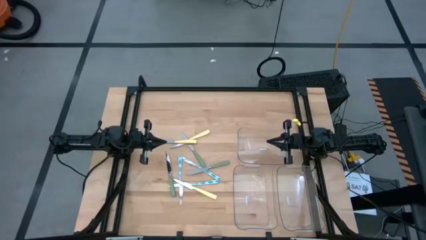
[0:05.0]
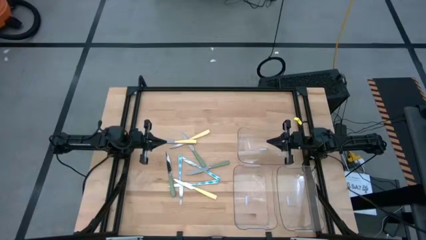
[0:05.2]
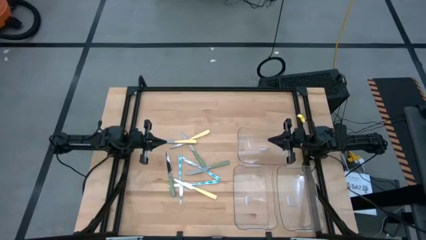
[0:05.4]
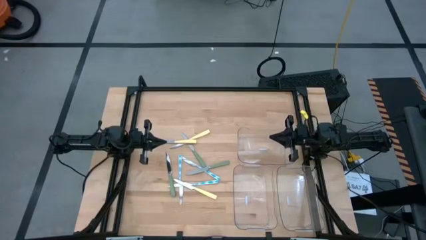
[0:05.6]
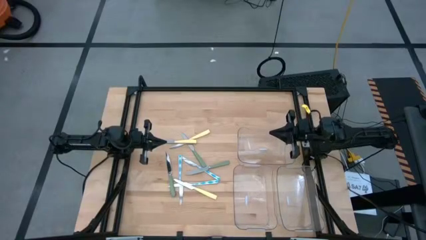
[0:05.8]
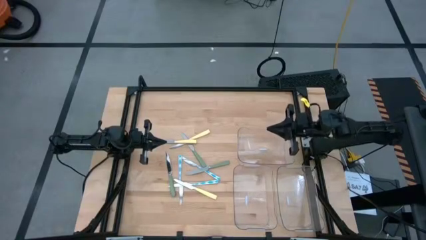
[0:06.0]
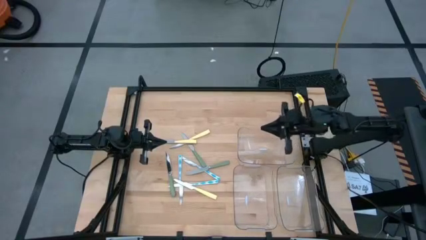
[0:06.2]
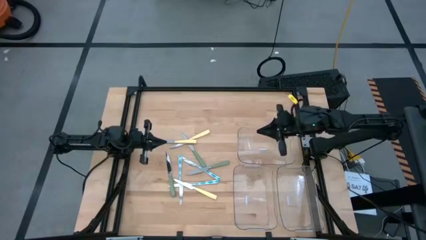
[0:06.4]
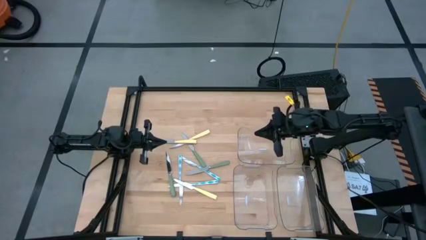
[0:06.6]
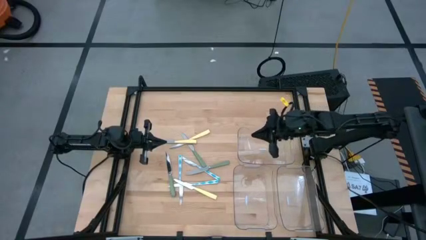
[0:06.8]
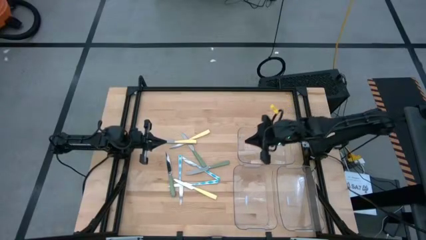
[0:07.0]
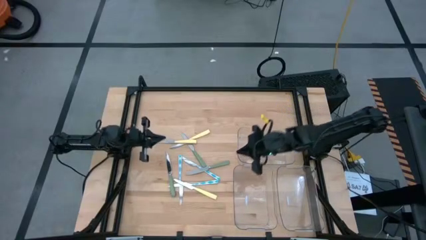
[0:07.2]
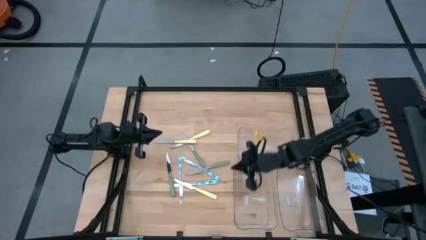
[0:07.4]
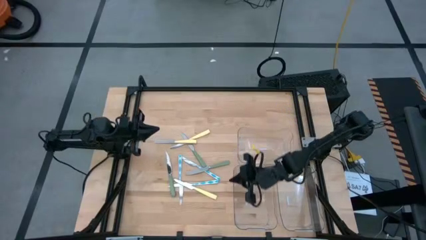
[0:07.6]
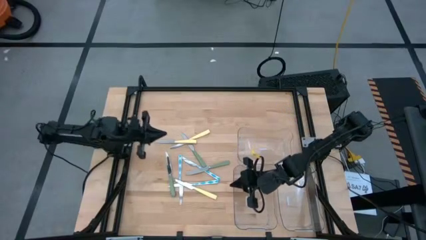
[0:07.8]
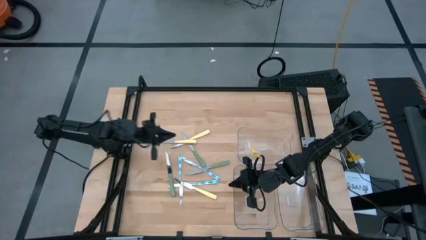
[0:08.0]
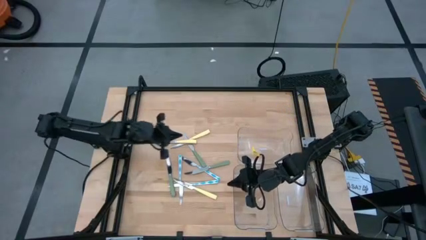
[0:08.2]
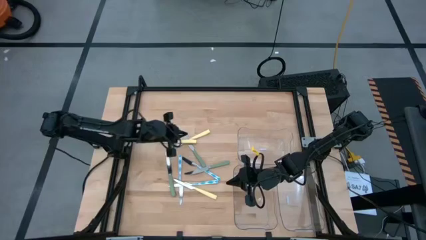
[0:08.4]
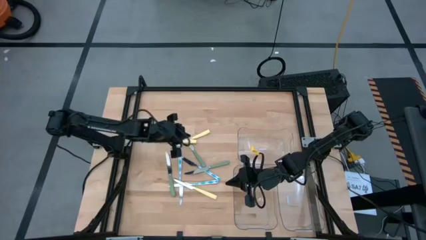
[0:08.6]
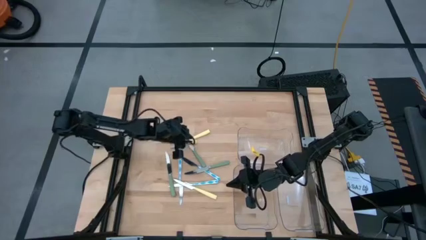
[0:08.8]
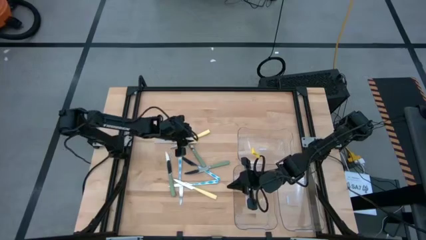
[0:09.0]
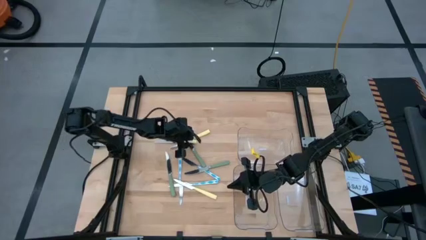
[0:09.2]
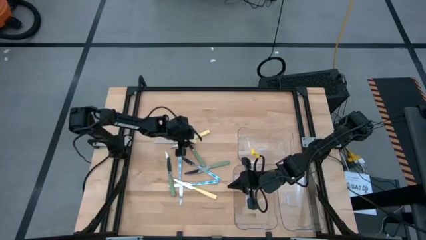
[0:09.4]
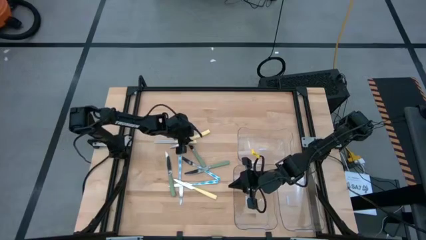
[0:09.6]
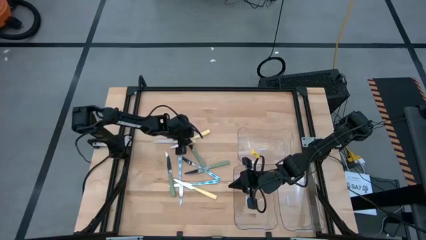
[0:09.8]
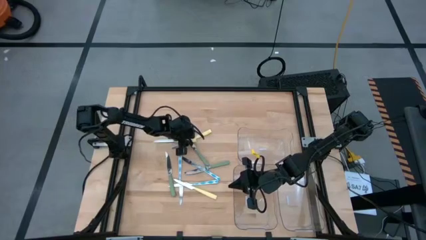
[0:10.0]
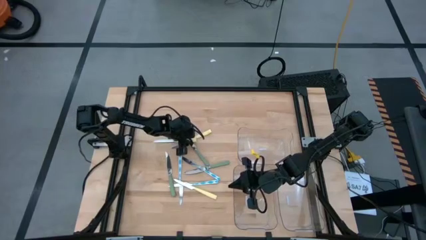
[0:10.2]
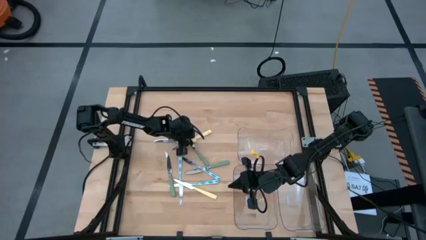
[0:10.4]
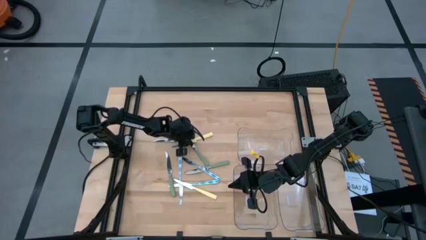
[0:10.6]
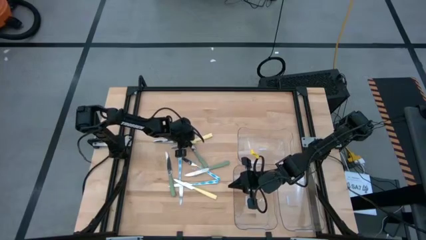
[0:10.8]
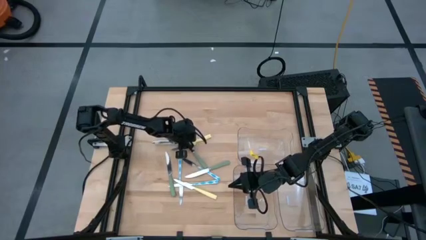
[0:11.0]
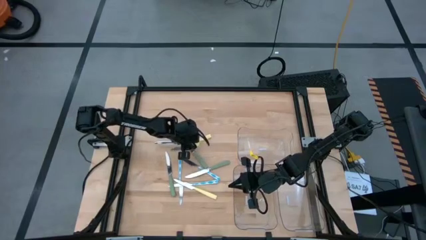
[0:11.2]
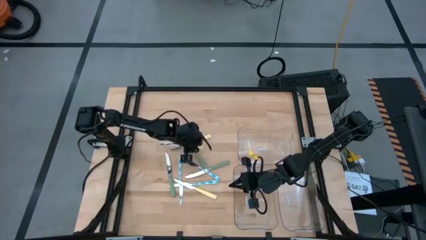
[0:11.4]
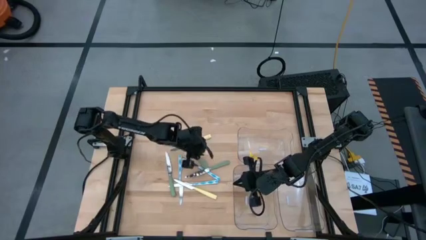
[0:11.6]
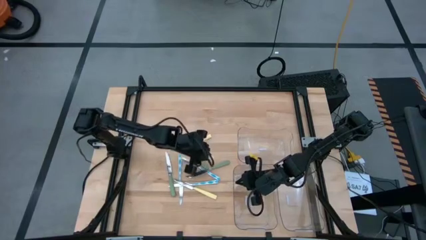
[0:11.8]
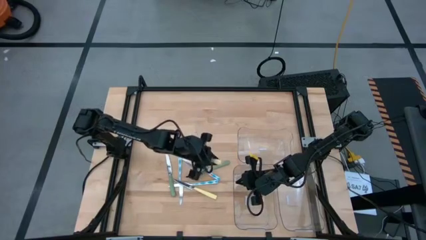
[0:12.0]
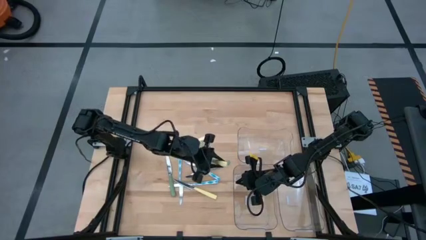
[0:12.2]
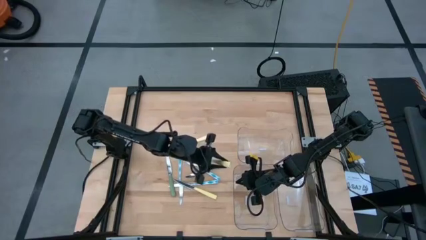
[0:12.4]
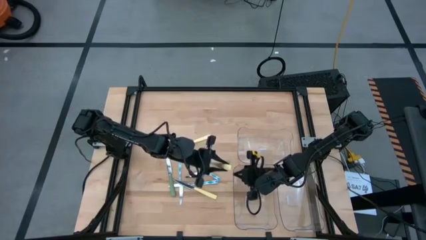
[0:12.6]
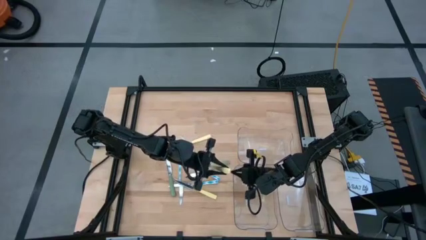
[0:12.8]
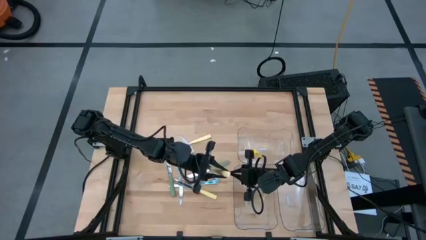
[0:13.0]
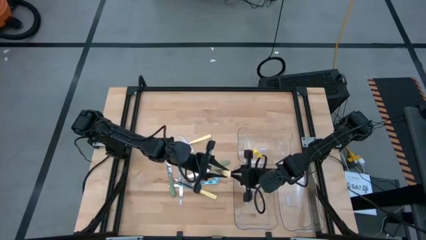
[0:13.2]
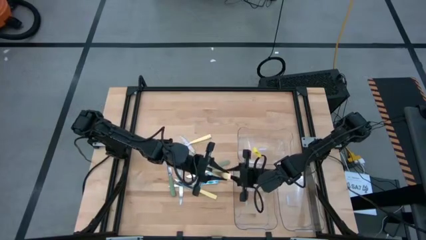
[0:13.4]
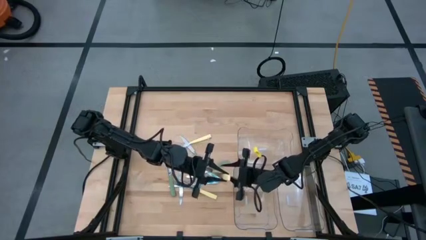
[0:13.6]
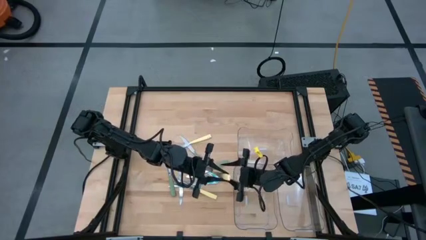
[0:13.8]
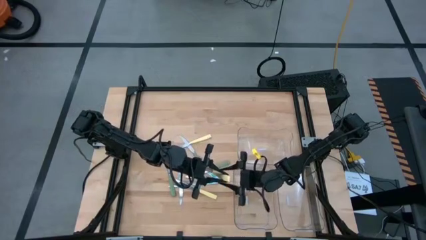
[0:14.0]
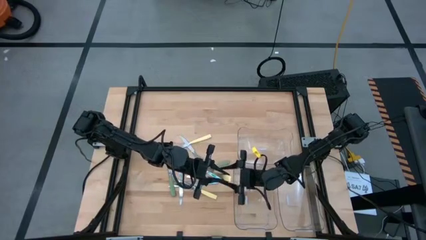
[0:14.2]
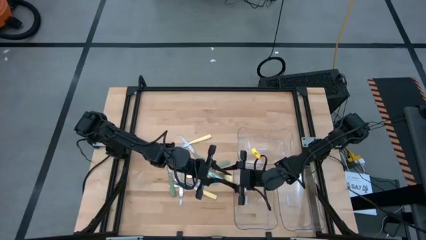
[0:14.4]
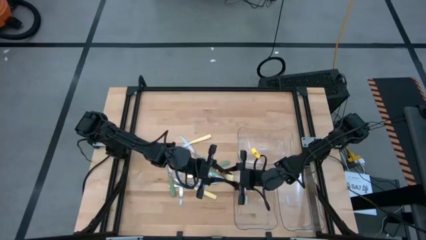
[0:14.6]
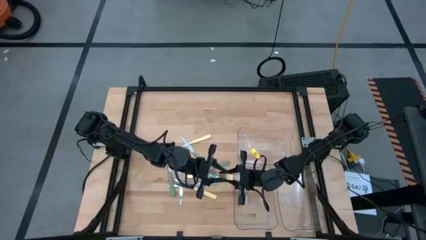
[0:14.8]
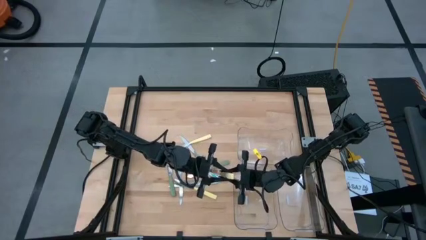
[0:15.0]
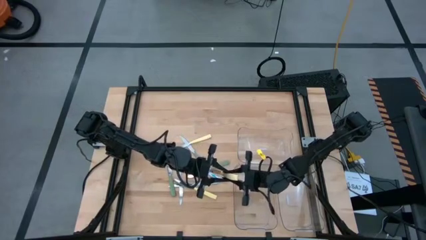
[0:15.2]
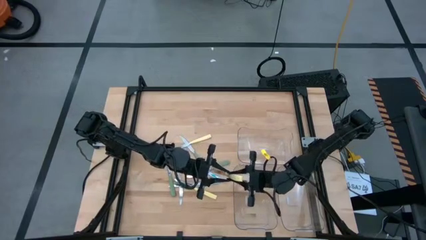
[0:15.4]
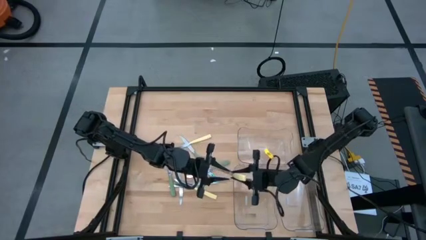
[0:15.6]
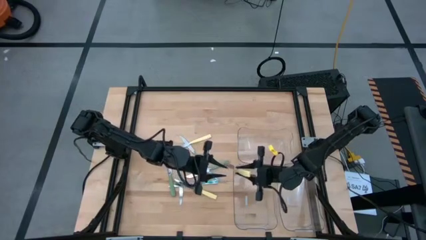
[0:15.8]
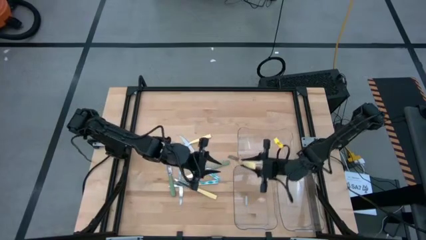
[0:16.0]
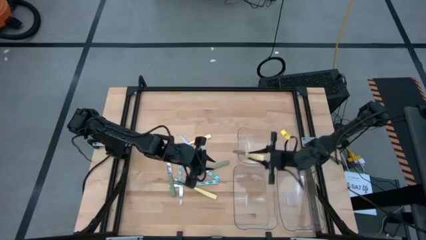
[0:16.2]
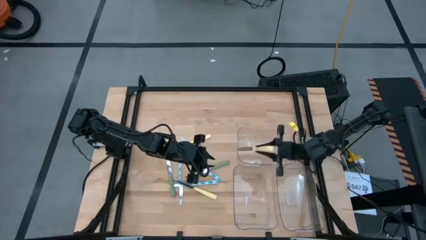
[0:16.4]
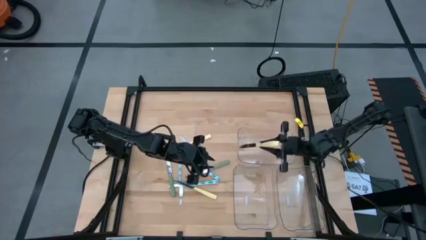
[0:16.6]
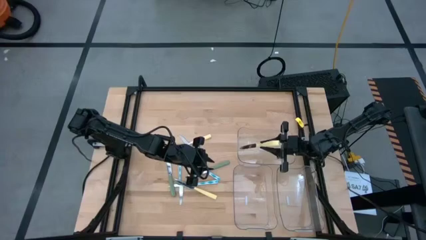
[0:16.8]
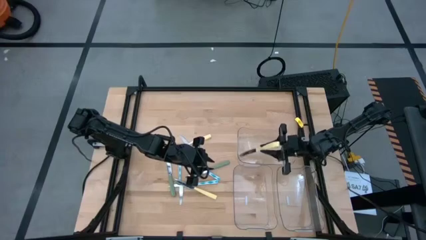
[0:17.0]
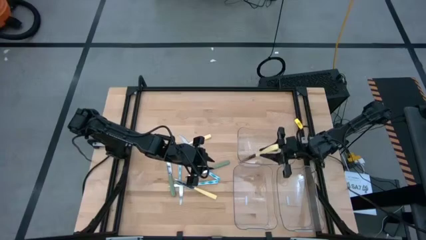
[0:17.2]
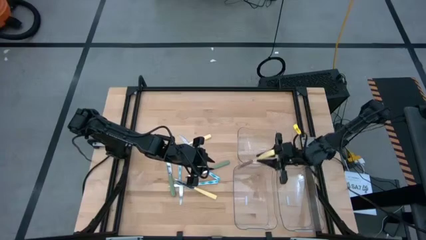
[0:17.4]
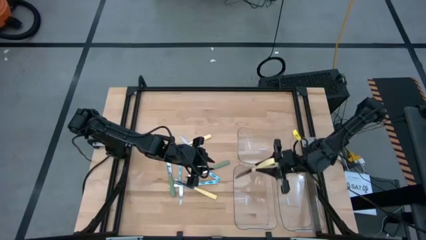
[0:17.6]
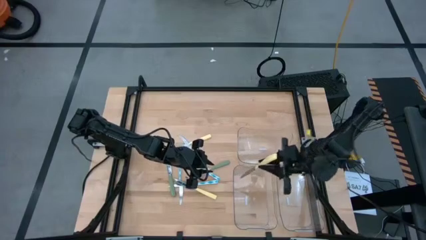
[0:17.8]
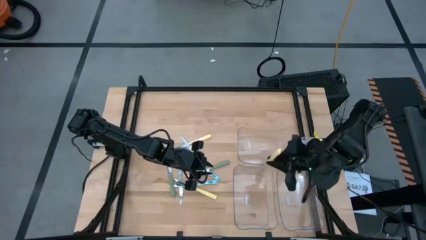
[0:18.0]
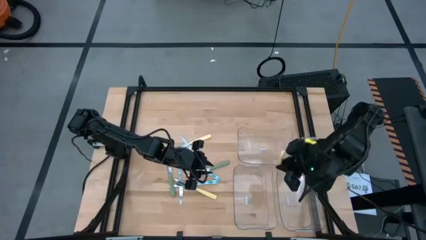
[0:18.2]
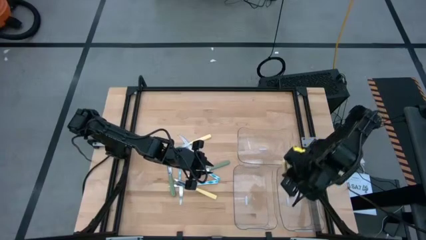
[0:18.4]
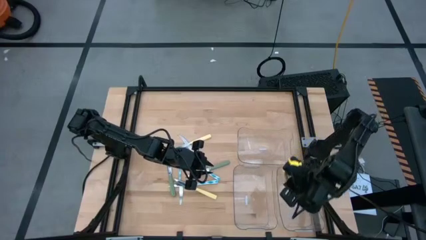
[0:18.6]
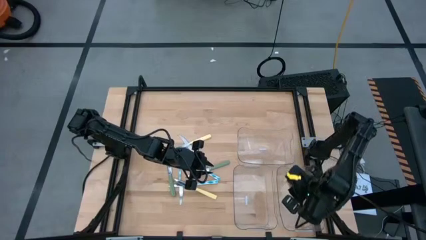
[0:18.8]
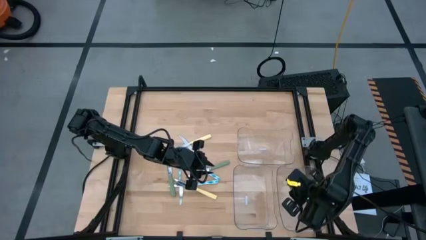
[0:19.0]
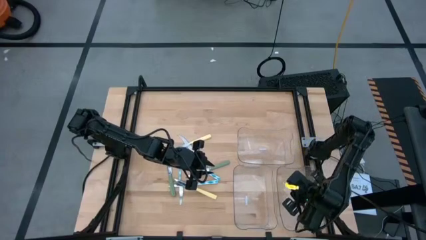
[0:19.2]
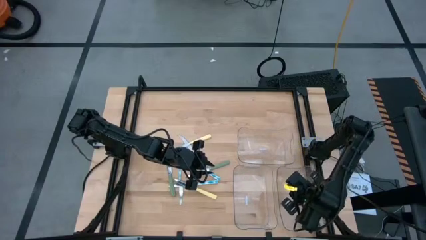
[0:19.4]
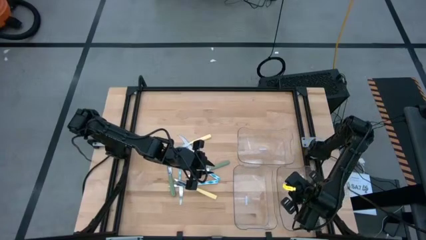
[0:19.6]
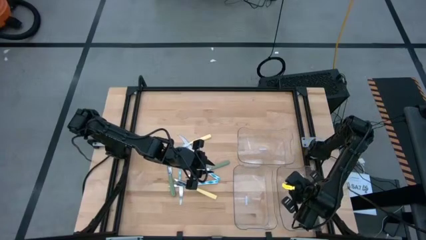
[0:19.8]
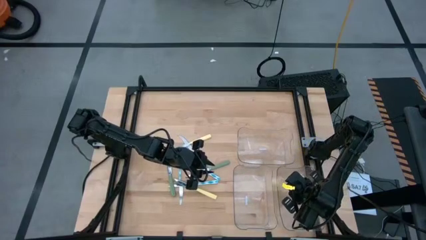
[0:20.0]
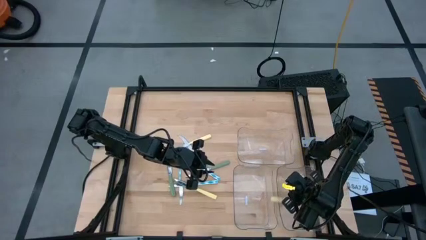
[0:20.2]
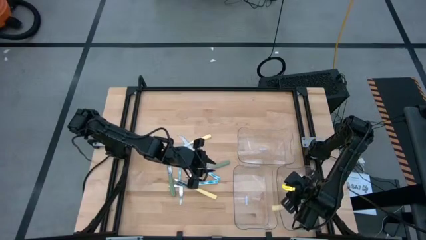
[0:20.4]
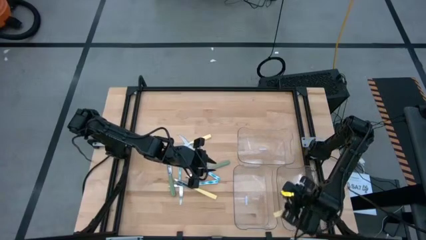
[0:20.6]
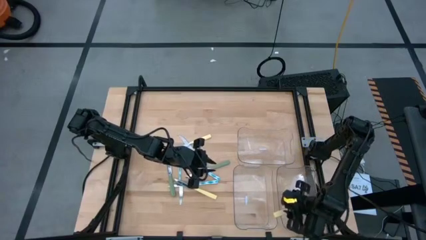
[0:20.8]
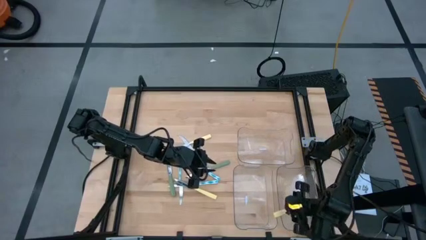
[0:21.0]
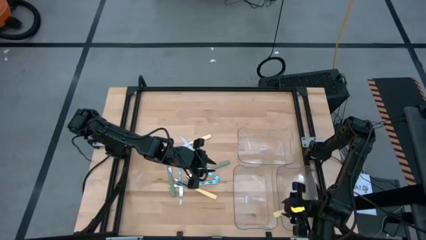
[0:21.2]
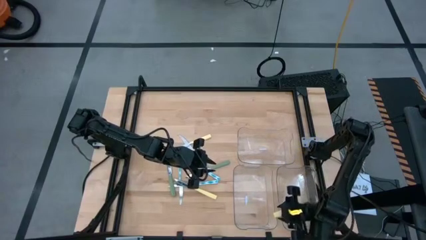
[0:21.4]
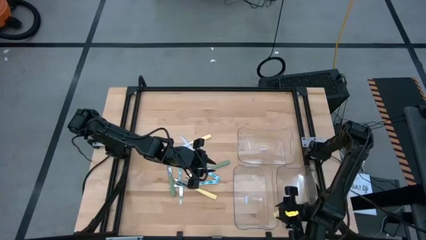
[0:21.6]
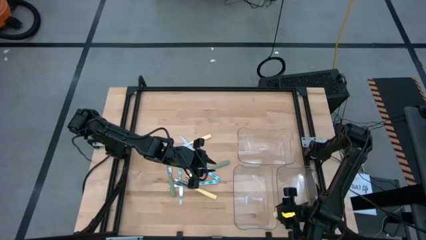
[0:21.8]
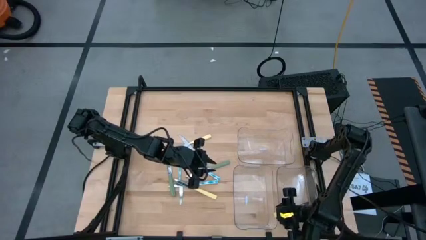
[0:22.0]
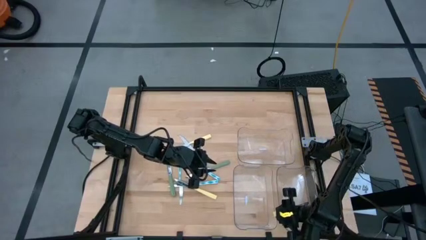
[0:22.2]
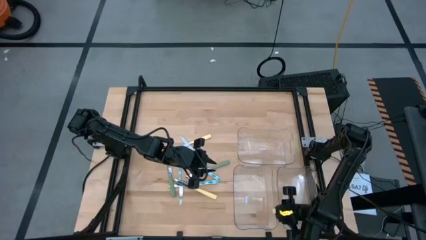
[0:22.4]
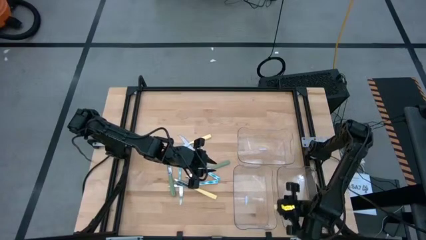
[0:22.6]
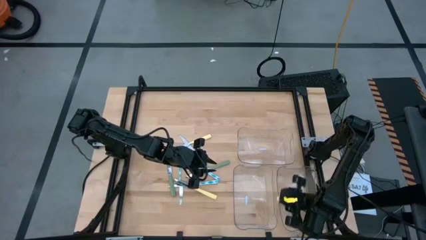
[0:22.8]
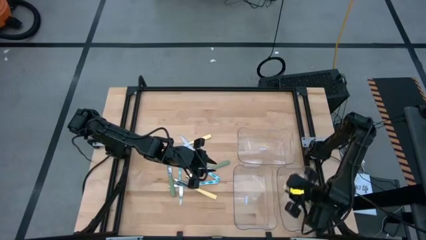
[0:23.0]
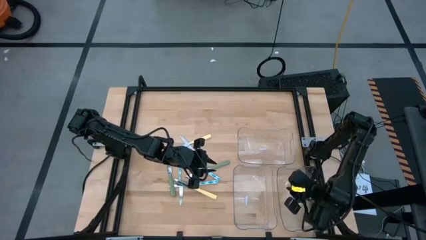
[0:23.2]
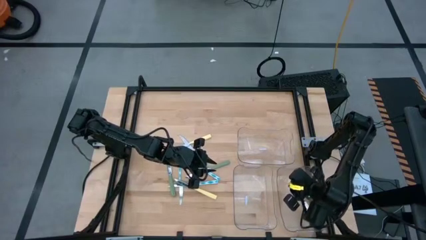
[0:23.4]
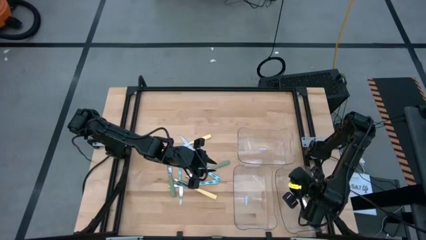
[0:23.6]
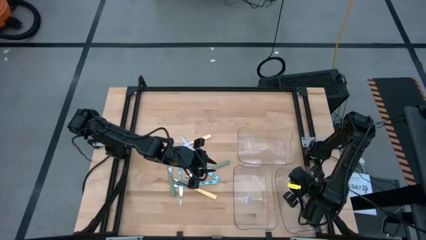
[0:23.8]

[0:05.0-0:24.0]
Task: Sort silverware by color (type)
Put the yellow knife into the bottom right transparent bin
